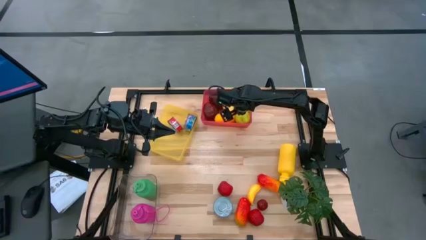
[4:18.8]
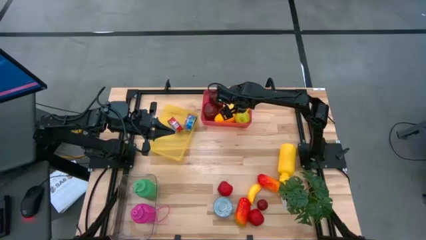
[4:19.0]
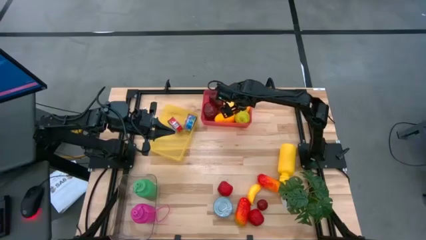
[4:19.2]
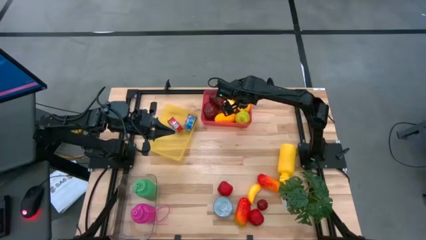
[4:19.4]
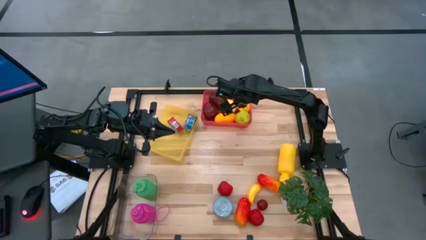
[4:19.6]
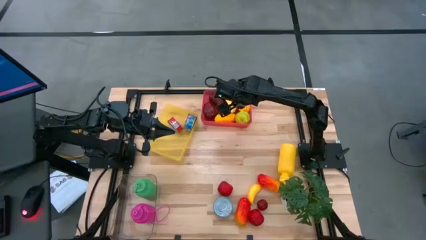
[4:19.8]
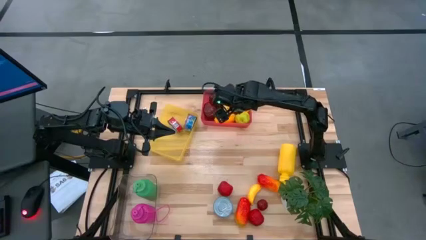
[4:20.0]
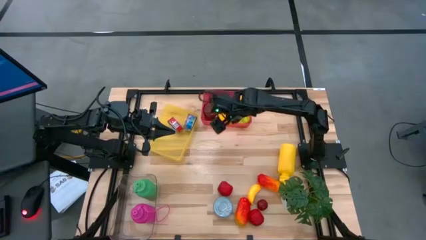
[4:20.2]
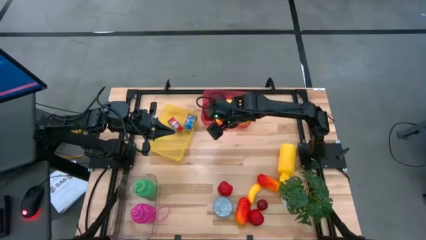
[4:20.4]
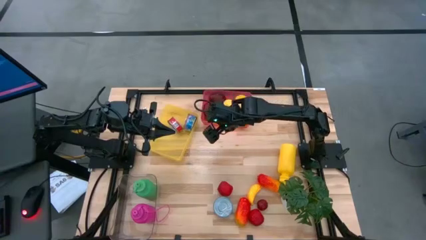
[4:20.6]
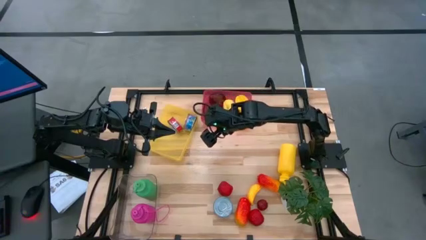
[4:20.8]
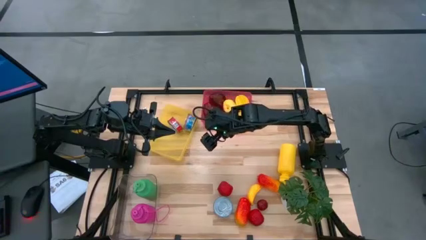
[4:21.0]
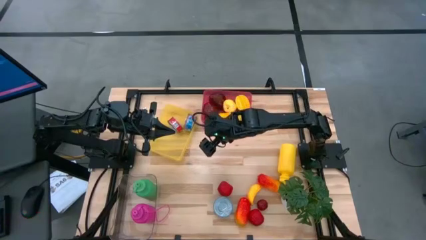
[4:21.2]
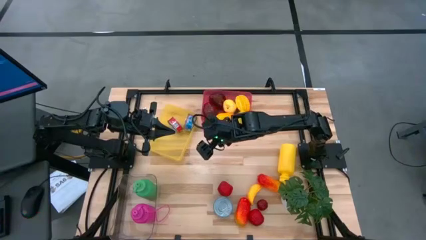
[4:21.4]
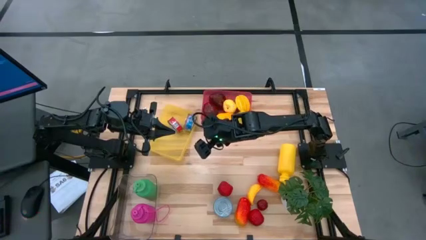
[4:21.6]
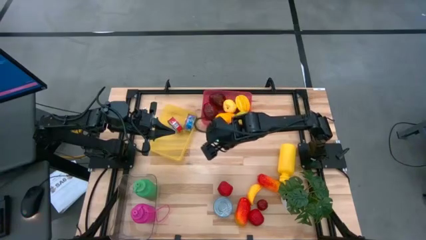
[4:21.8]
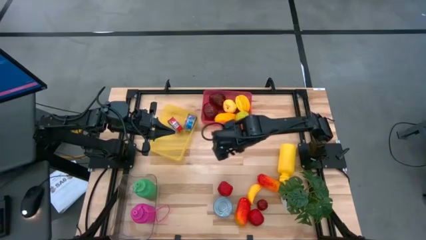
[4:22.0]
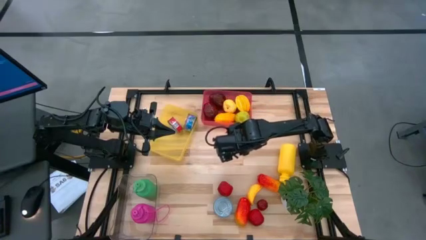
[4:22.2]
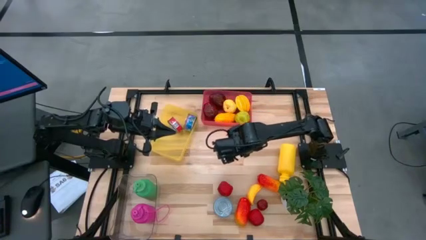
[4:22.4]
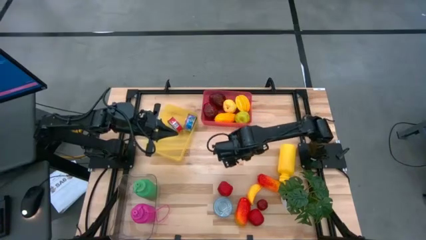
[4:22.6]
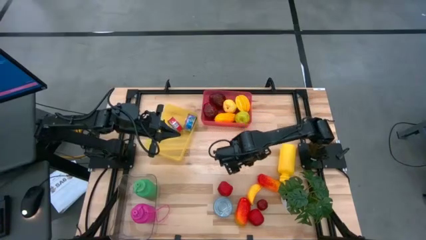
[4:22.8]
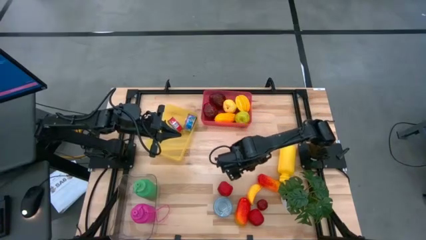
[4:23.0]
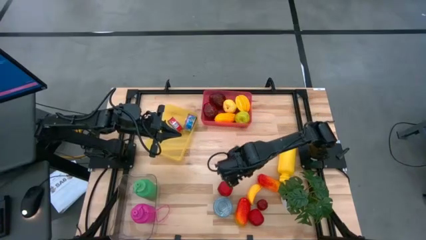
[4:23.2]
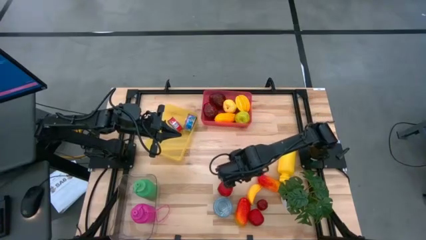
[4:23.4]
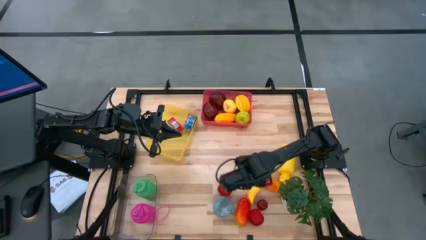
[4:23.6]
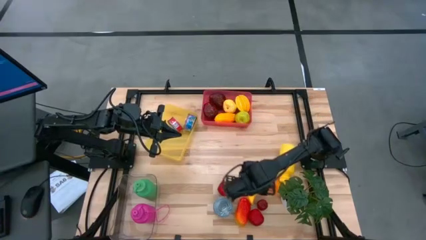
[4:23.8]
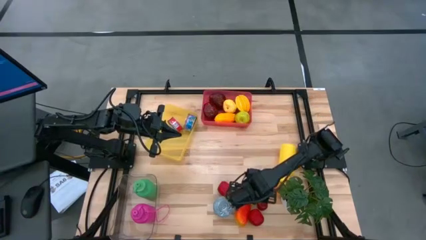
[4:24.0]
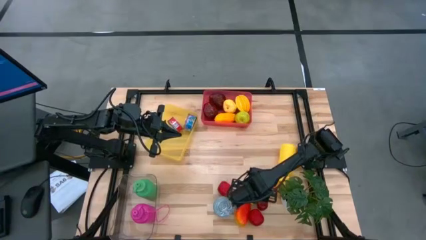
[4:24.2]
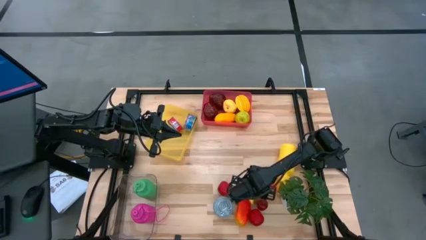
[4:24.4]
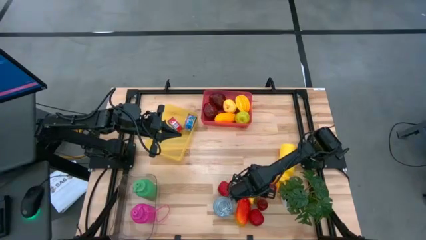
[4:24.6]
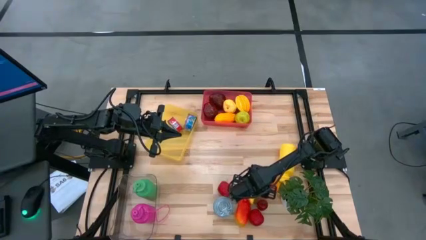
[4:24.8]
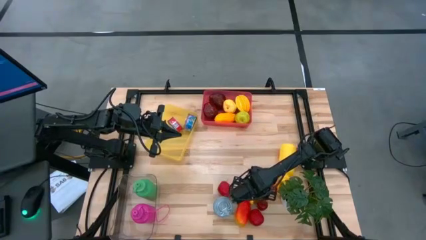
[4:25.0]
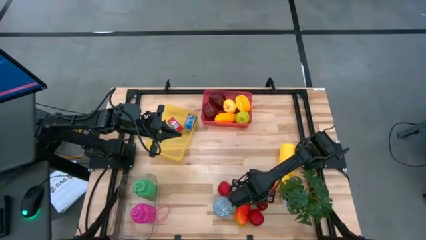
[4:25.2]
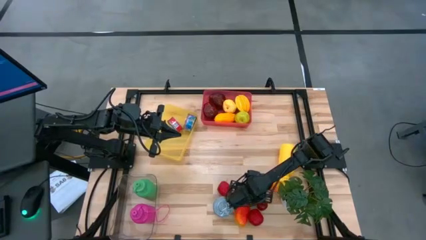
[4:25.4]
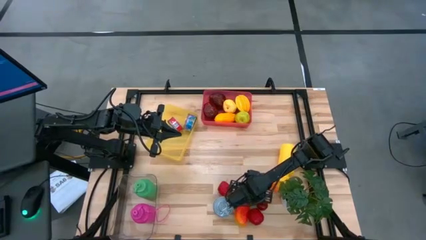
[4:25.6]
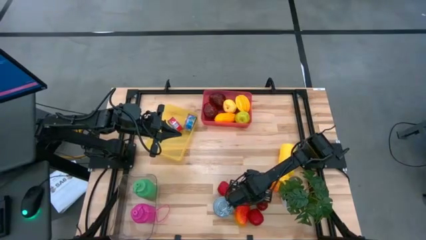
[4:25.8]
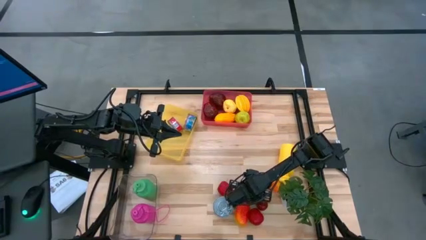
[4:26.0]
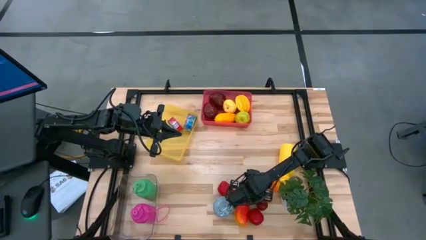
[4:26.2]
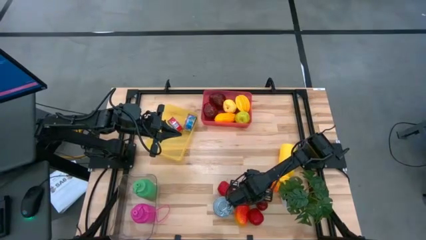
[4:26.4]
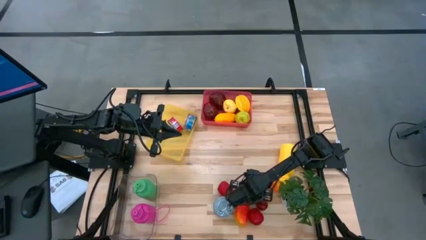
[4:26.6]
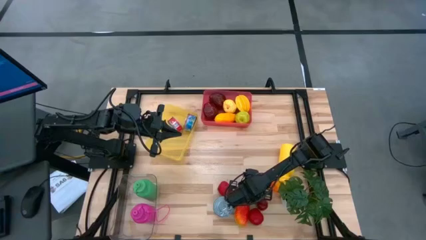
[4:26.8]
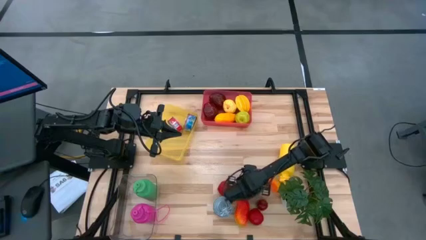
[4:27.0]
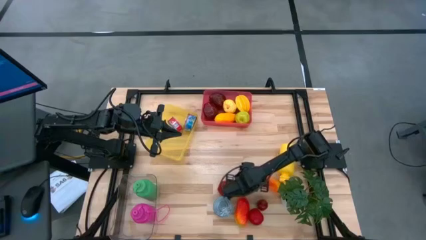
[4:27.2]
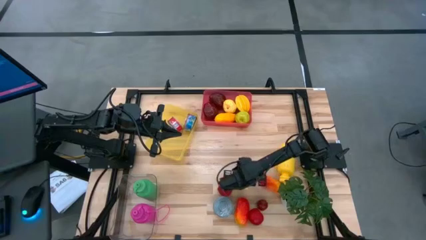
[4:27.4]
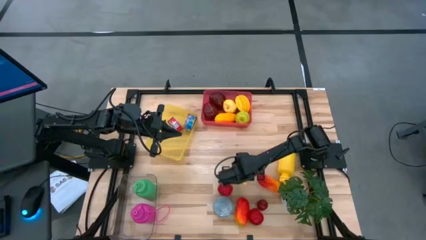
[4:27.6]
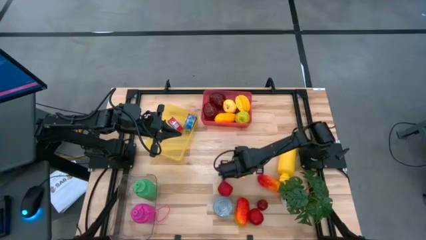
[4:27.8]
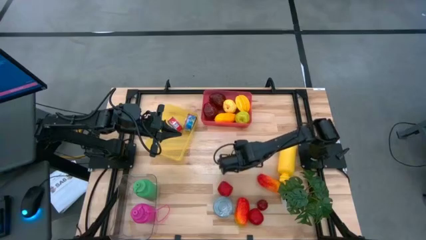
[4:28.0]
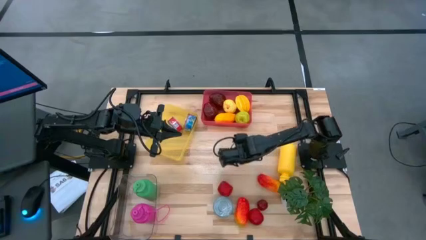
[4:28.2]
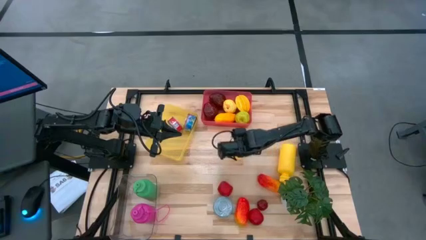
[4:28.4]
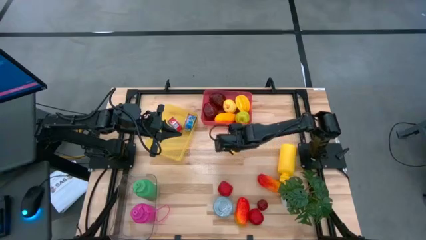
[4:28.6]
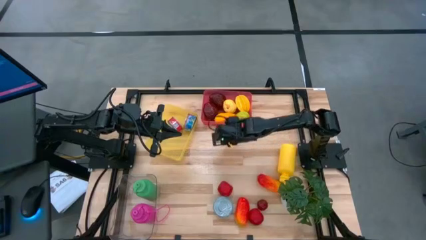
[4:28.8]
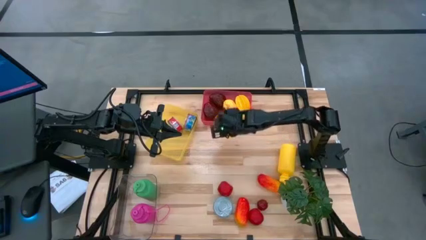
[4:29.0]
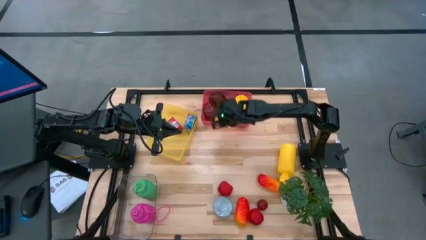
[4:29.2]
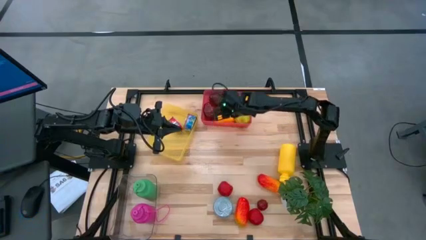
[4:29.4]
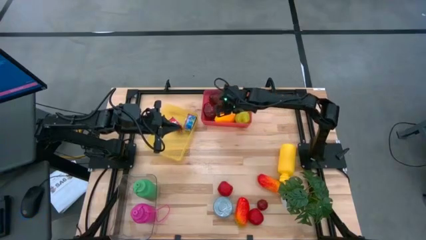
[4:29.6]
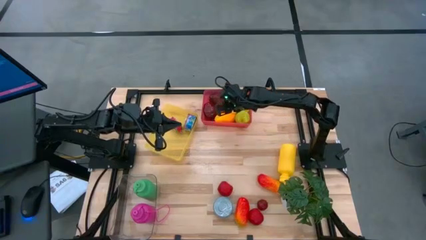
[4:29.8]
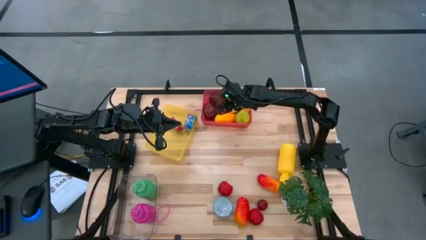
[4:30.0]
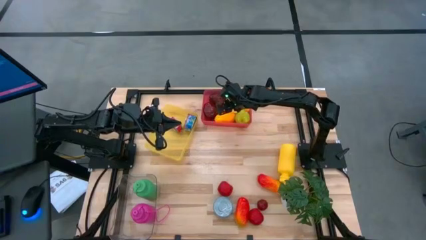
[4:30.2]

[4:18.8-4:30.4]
Task: Pick & Place Food Item
Put the banana into the pink bin
